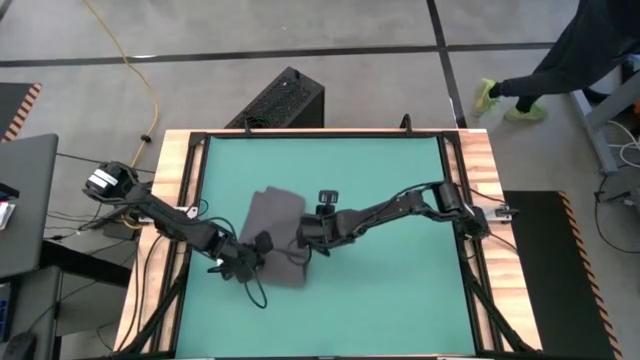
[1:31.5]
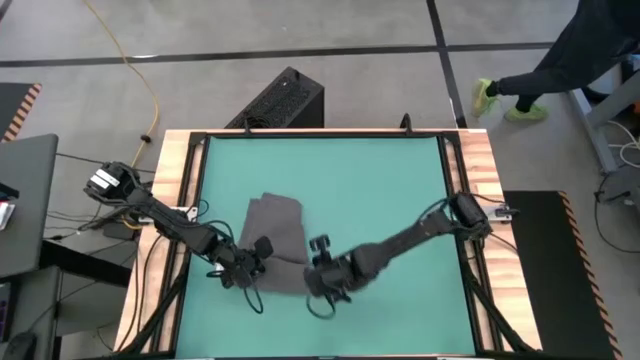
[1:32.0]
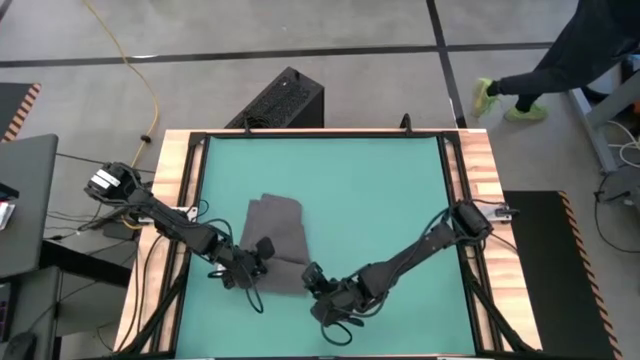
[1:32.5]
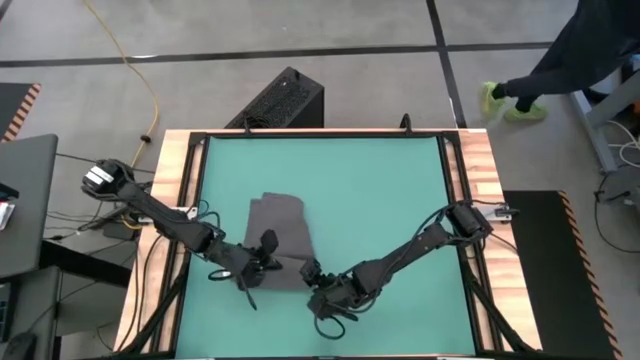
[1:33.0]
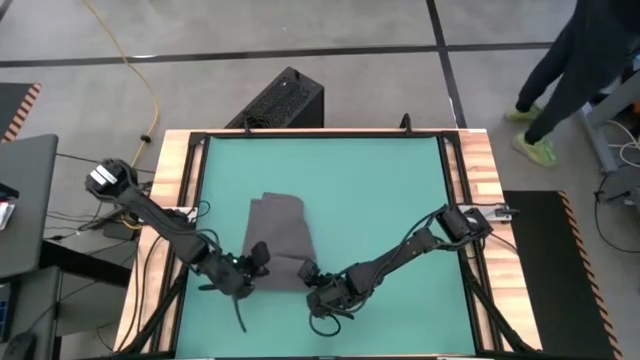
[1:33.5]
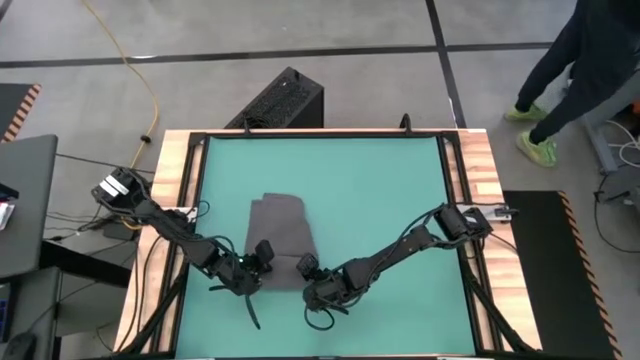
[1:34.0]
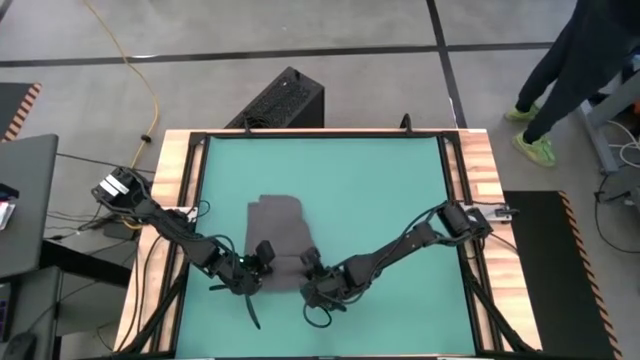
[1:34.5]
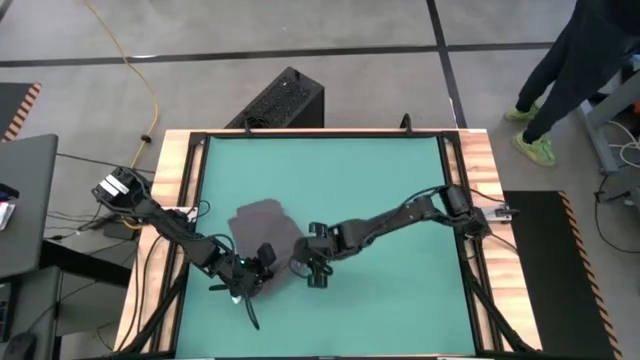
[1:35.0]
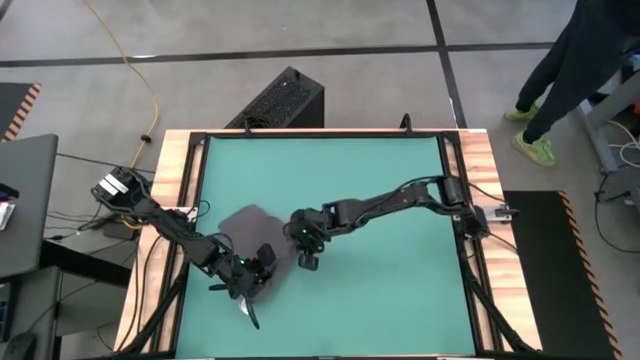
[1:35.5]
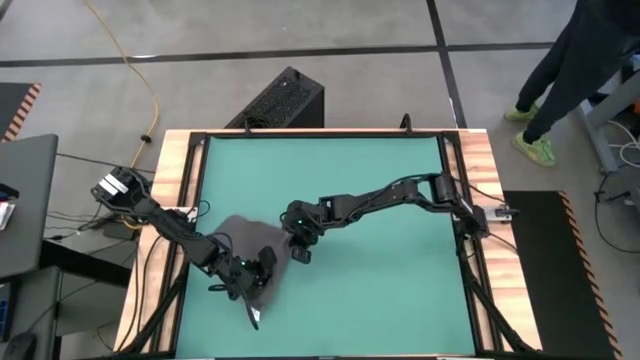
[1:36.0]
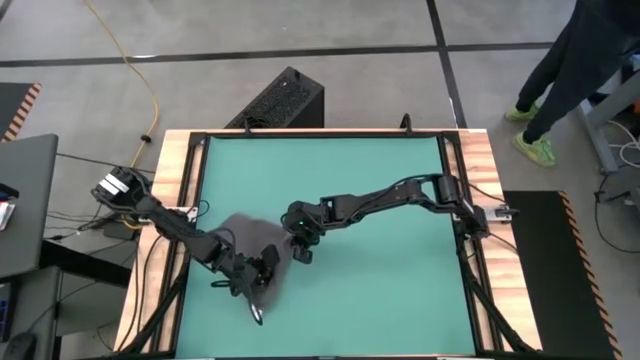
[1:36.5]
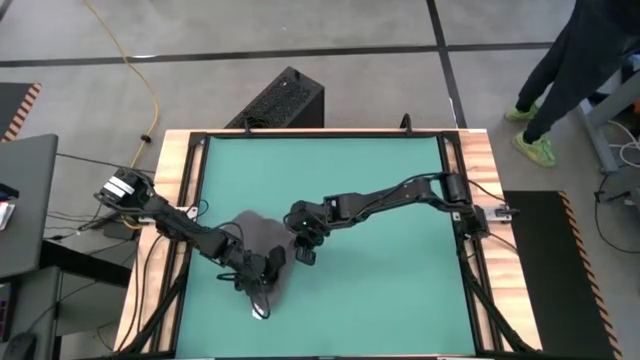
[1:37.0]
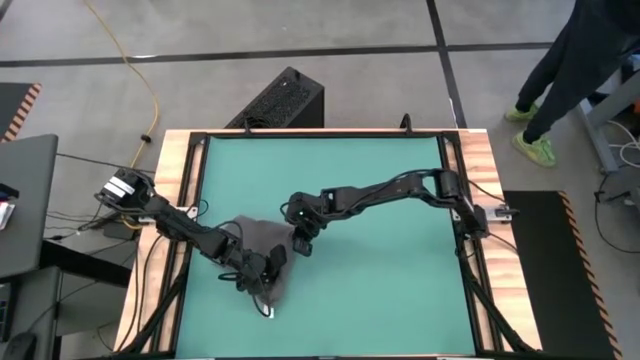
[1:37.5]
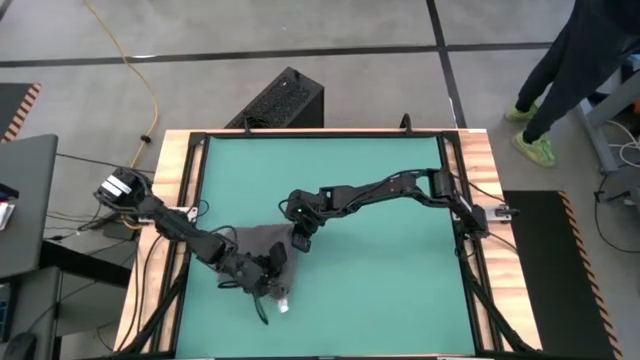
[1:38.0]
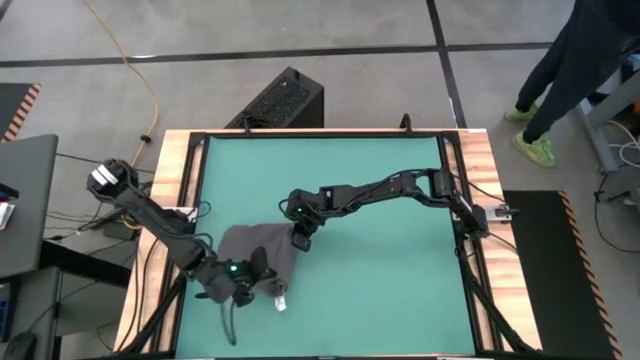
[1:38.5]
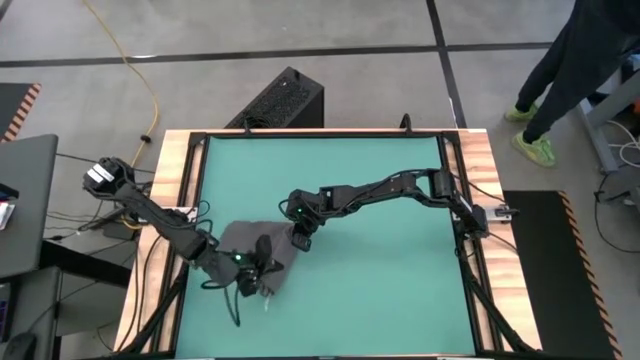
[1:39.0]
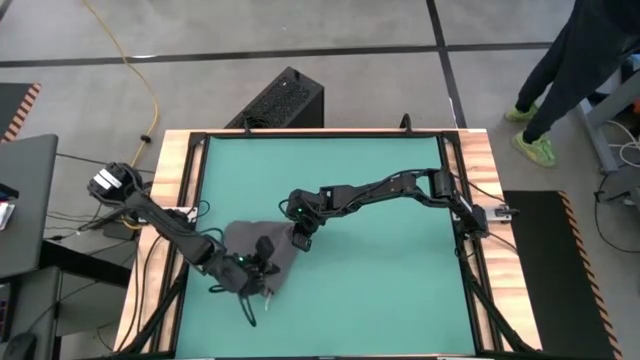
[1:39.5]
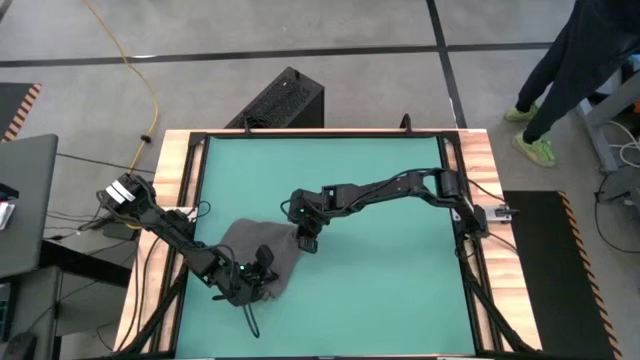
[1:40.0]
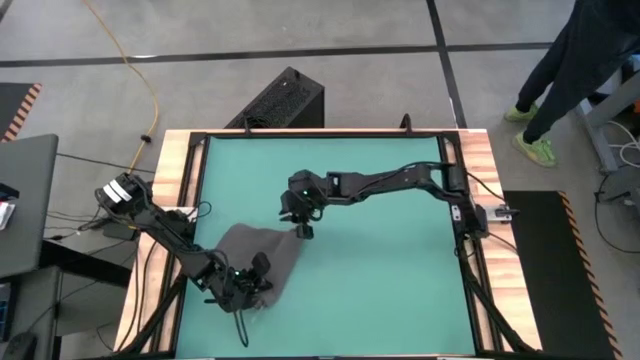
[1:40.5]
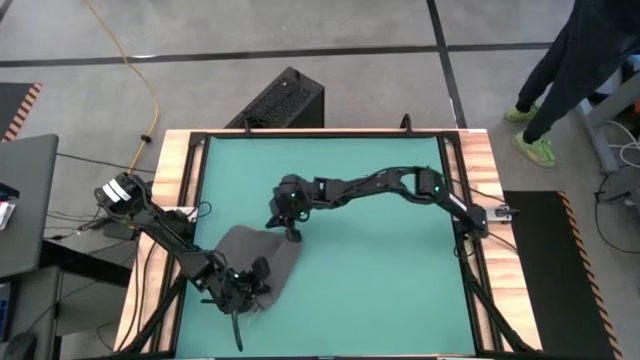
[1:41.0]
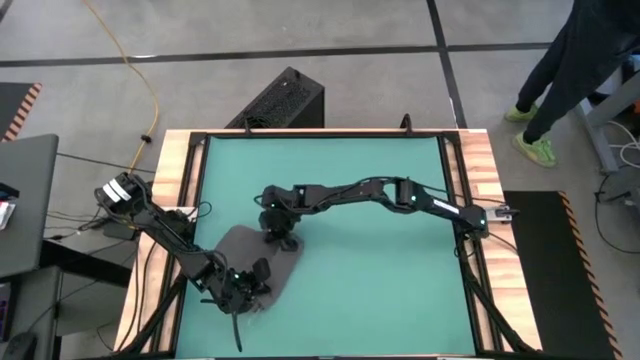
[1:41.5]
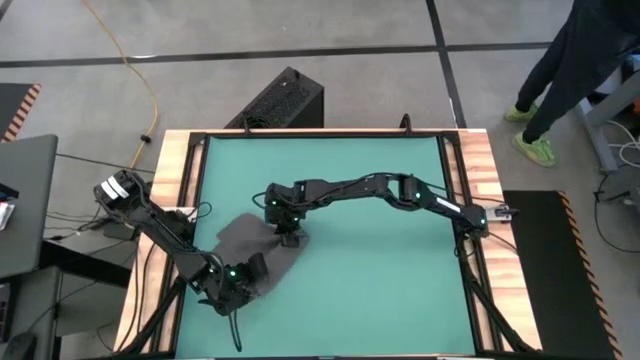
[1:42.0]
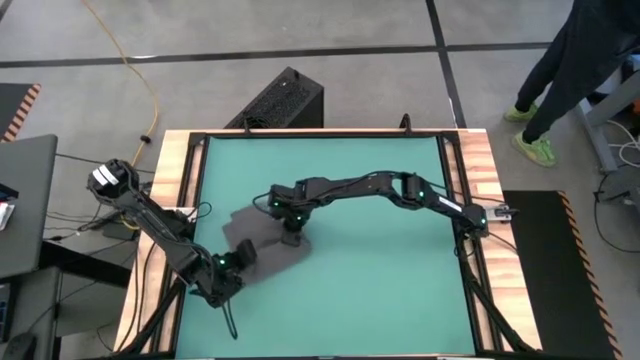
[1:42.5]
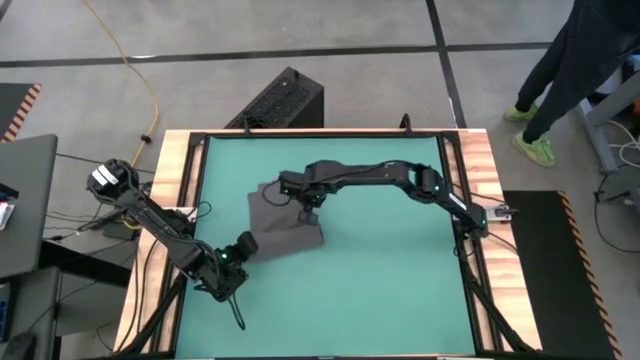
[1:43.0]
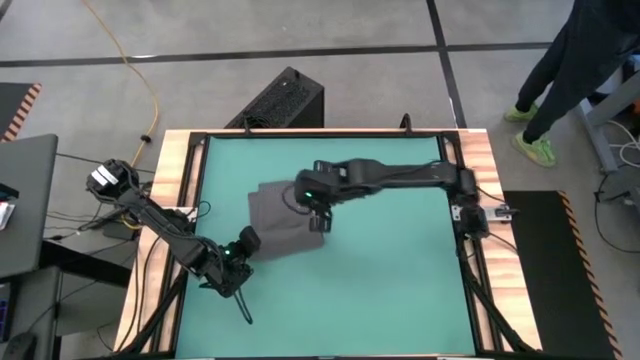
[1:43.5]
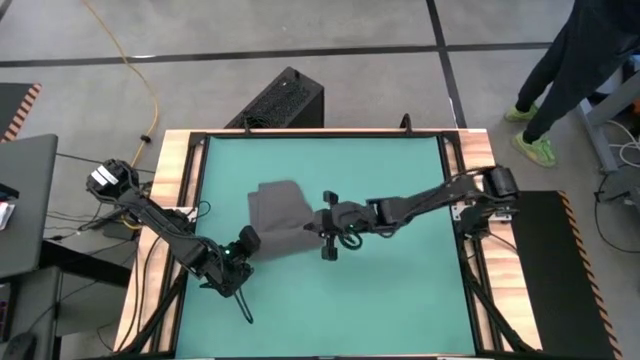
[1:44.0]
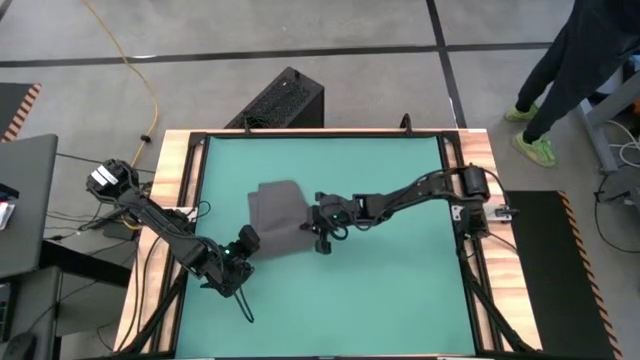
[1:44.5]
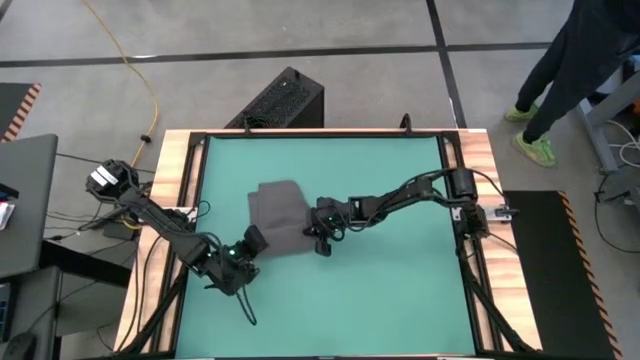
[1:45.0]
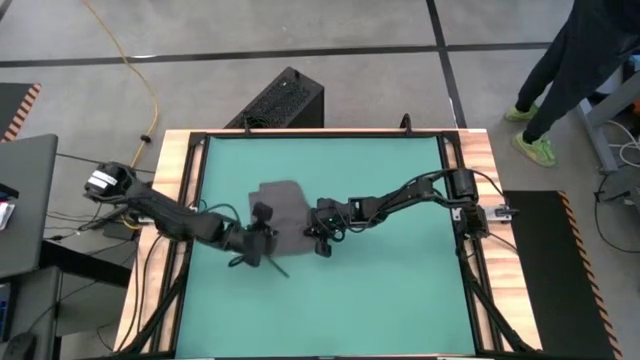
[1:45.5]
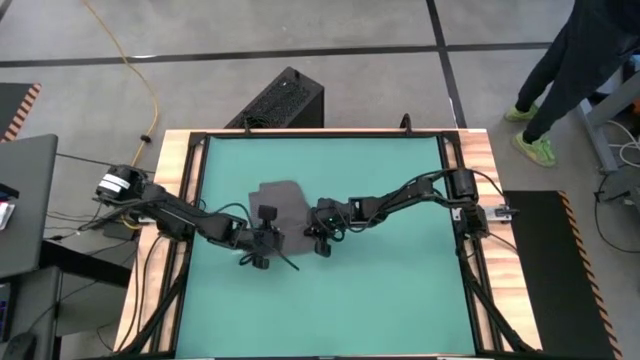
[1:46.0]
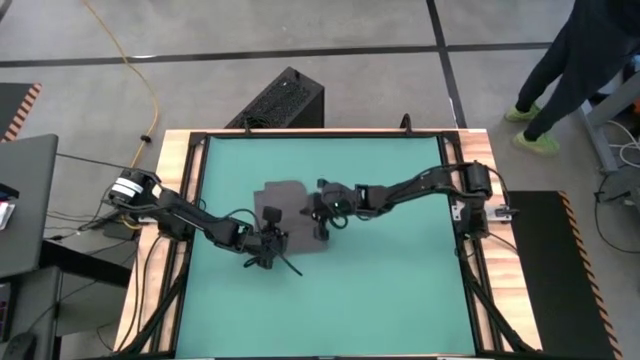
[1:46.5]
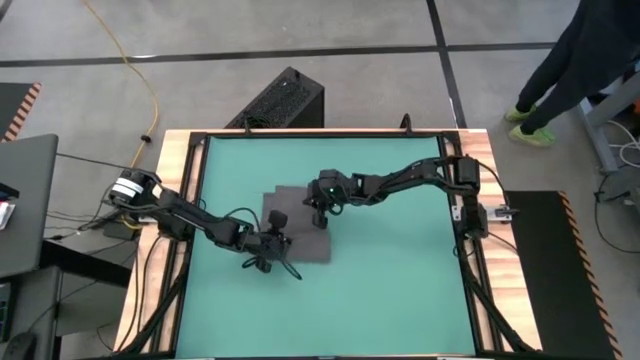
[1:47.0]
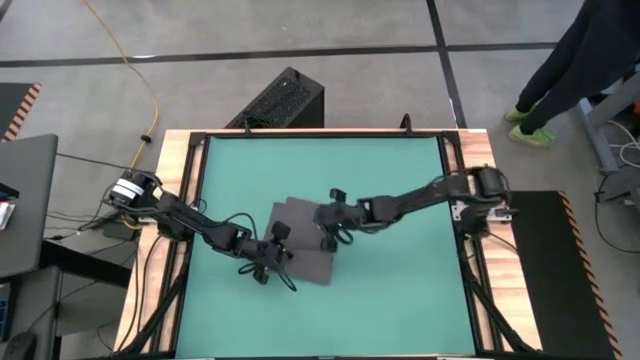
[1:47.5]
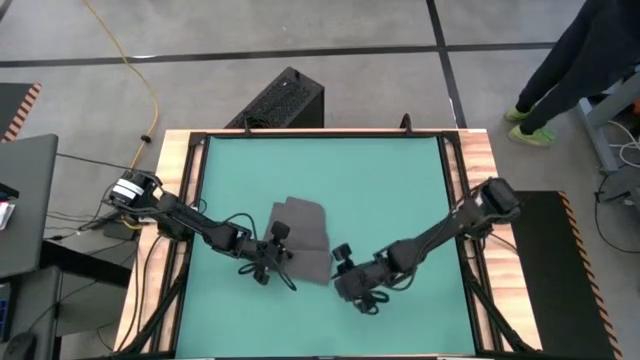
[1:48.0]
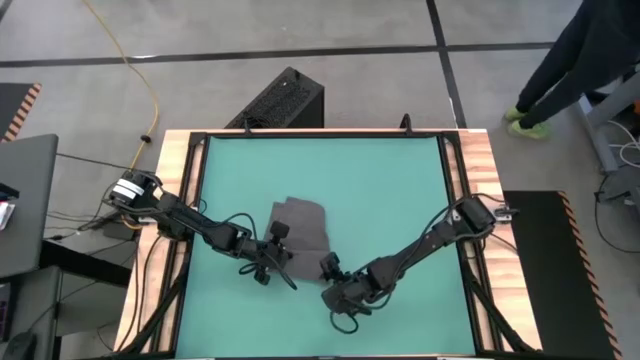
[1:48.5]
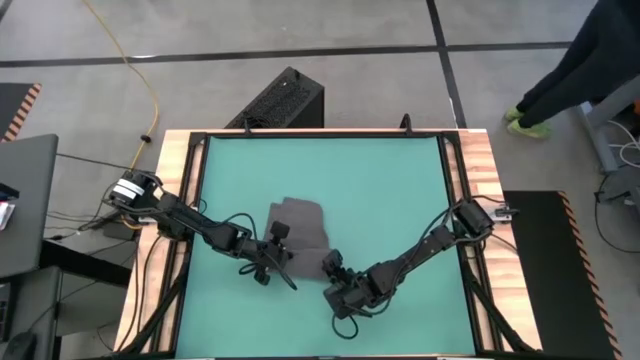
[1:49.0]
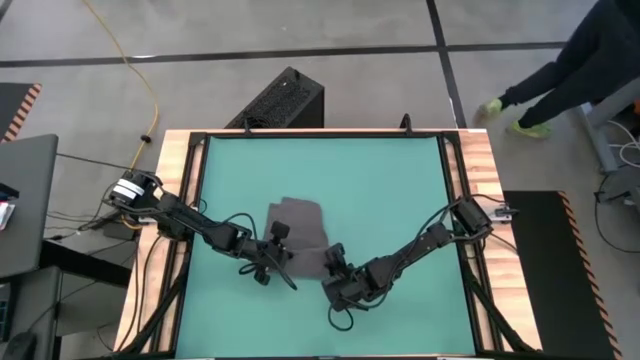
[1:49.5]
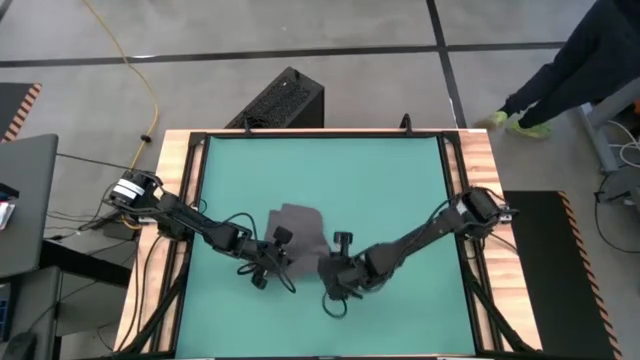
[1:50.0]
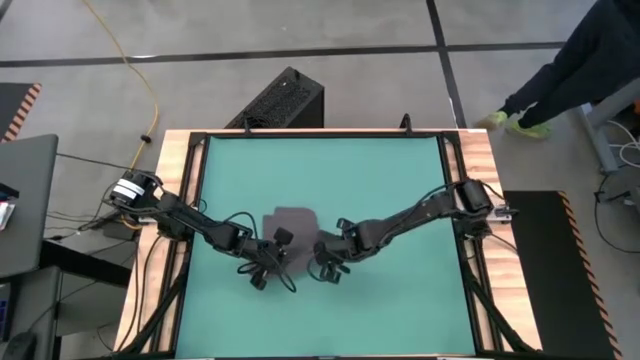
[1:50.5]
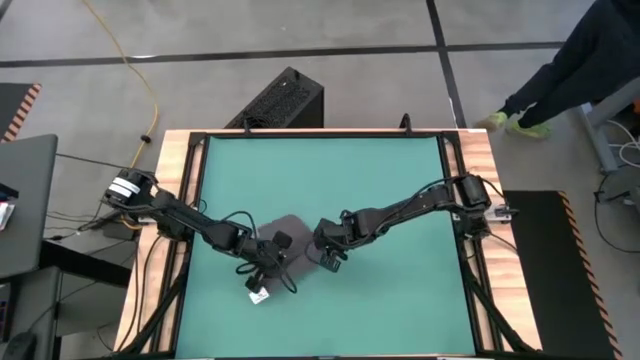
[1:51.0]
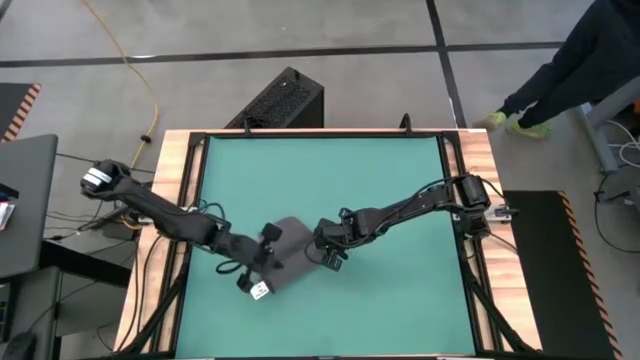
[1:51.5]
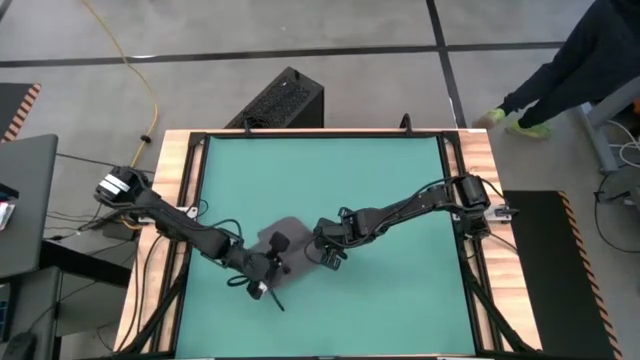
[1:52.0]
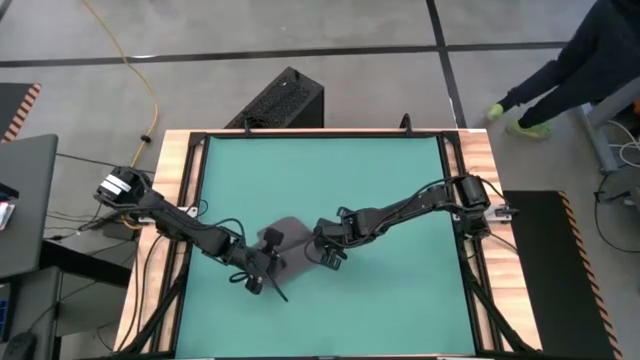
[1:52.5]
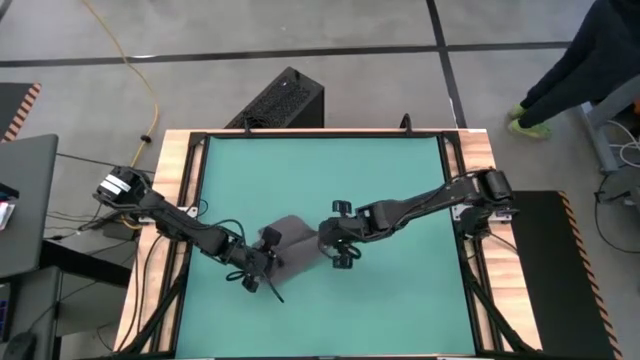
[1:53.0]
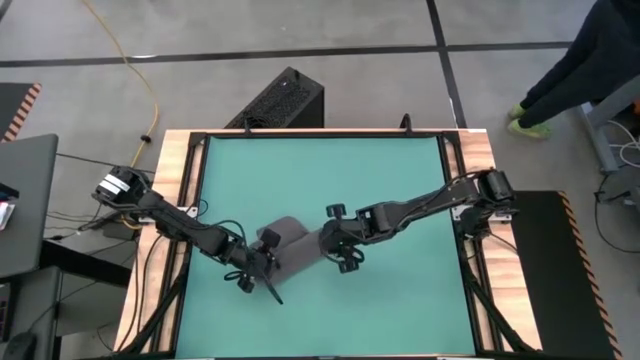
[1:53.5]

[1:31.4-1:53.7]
Task: Roll towel into tight, uniform cylinder
Roll the gray towel
